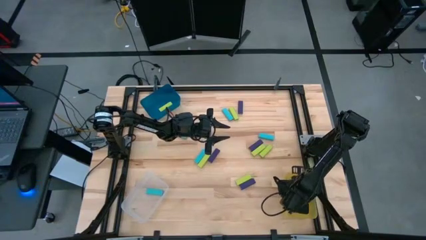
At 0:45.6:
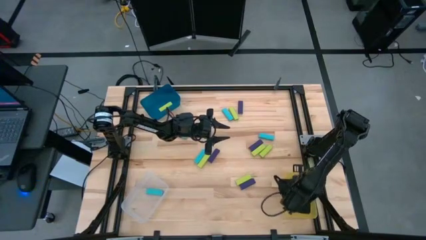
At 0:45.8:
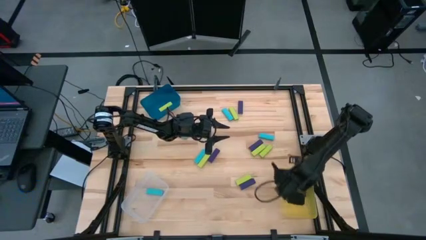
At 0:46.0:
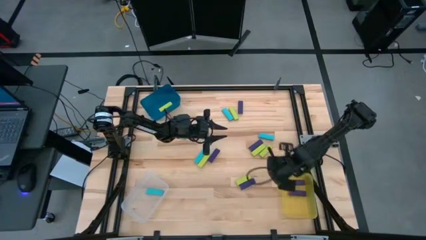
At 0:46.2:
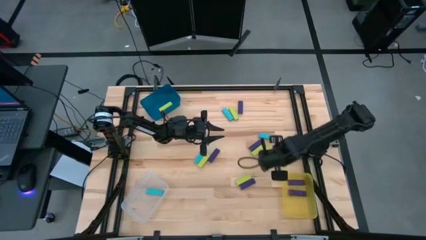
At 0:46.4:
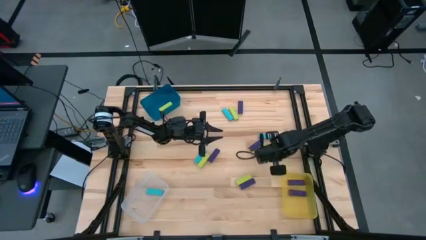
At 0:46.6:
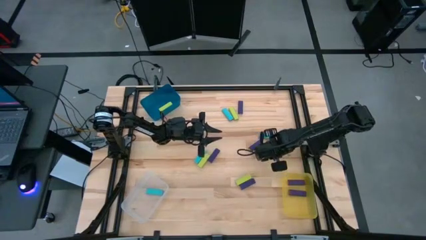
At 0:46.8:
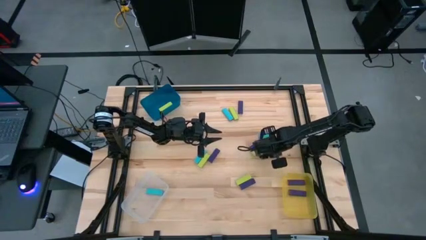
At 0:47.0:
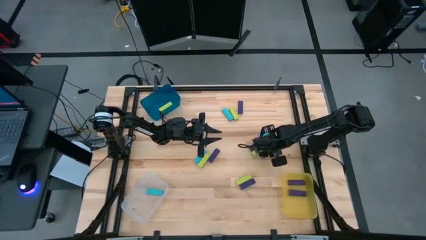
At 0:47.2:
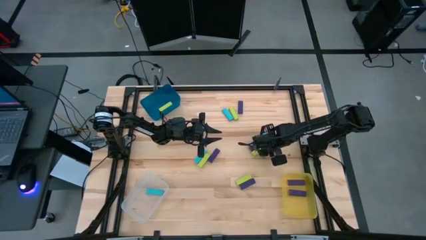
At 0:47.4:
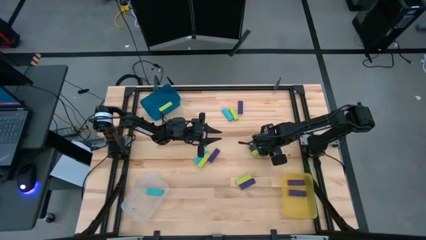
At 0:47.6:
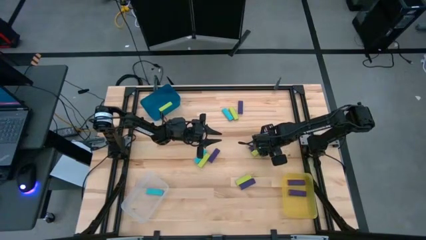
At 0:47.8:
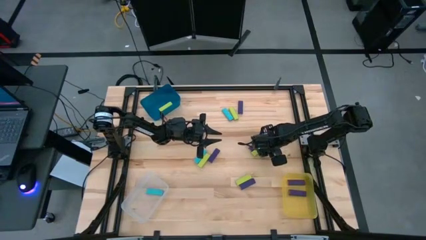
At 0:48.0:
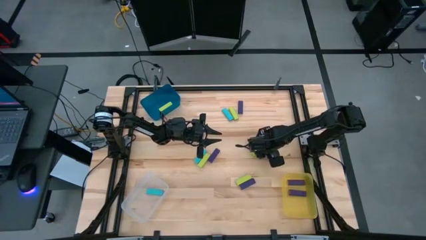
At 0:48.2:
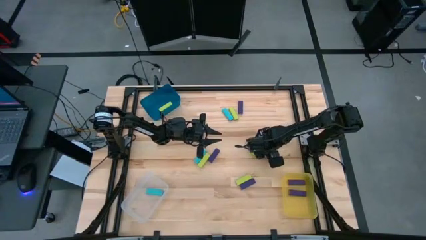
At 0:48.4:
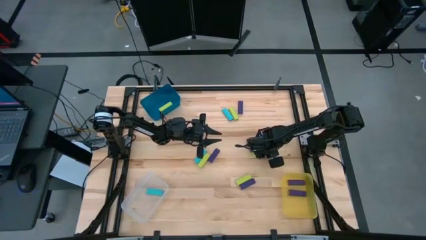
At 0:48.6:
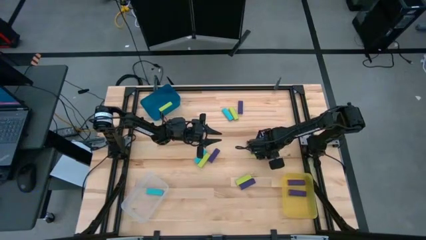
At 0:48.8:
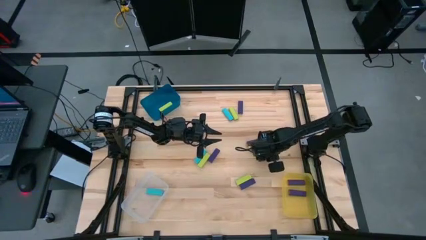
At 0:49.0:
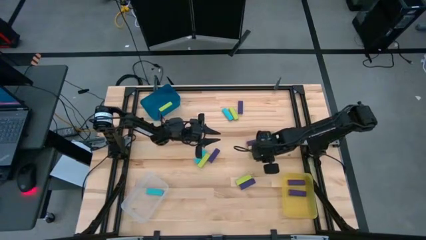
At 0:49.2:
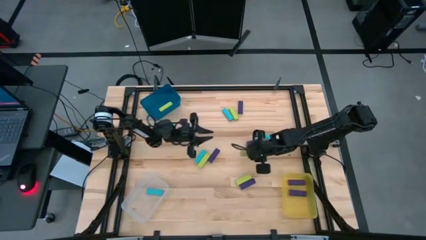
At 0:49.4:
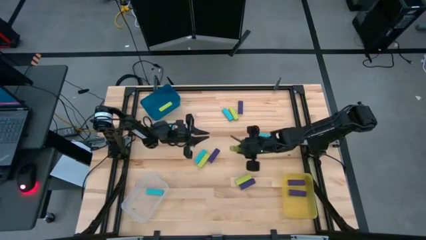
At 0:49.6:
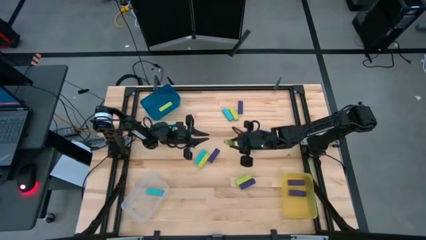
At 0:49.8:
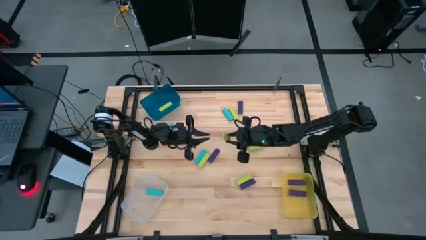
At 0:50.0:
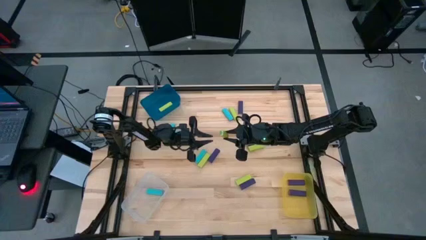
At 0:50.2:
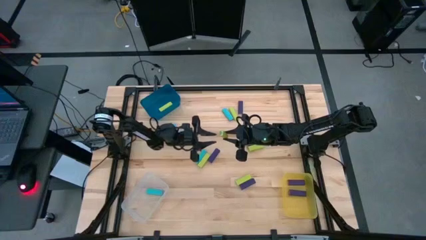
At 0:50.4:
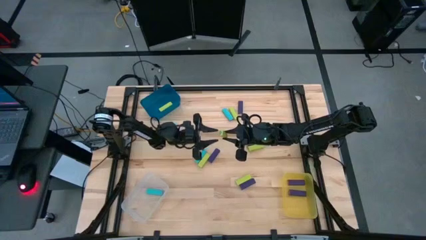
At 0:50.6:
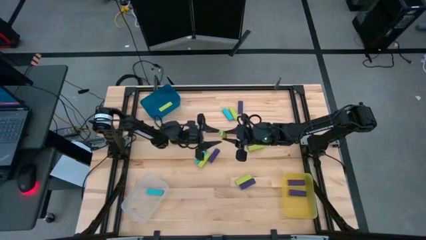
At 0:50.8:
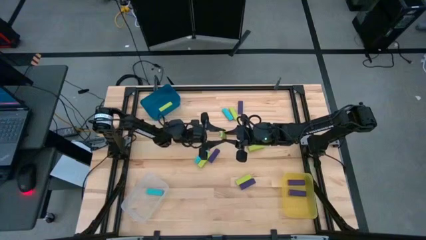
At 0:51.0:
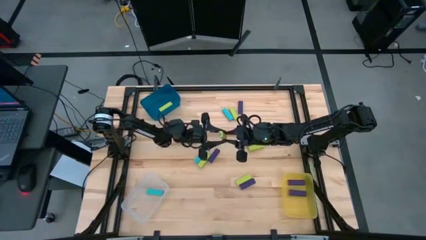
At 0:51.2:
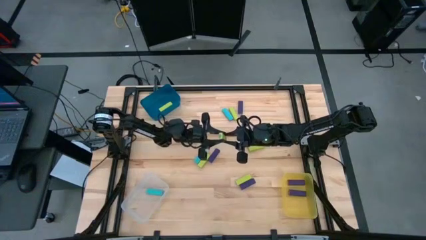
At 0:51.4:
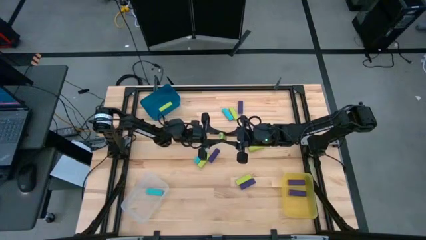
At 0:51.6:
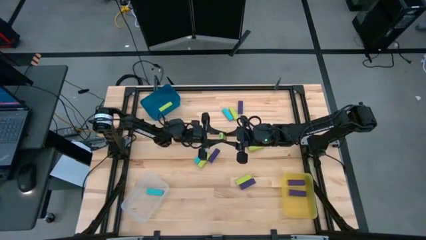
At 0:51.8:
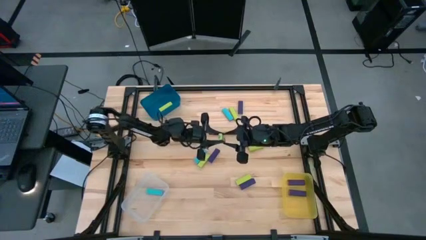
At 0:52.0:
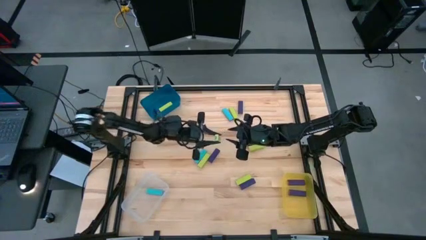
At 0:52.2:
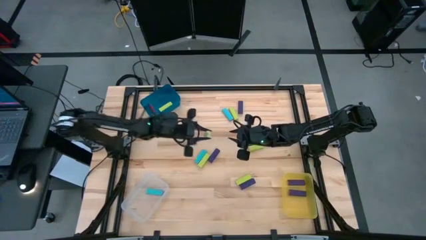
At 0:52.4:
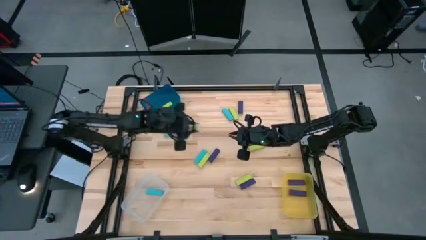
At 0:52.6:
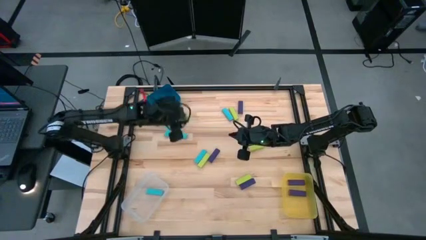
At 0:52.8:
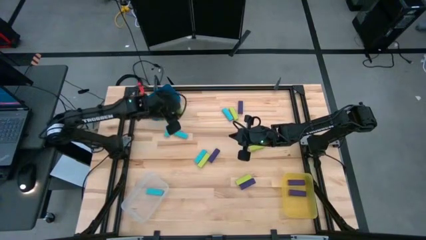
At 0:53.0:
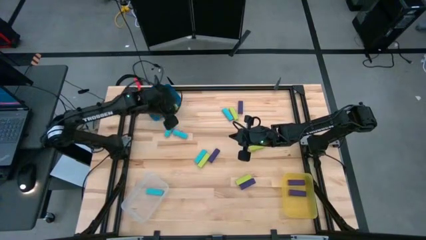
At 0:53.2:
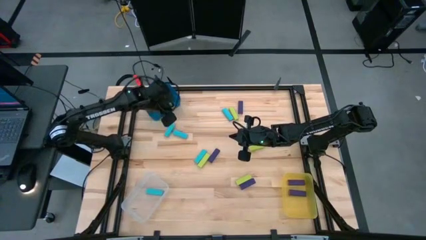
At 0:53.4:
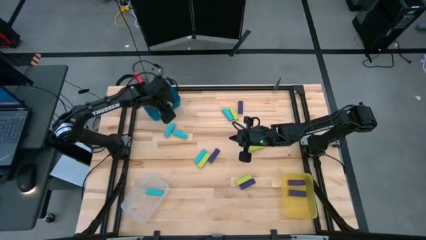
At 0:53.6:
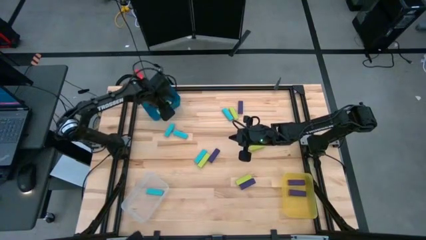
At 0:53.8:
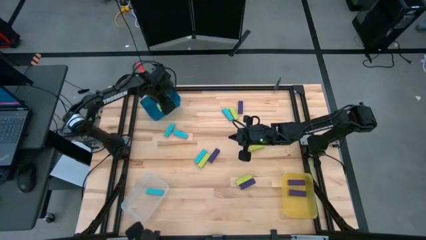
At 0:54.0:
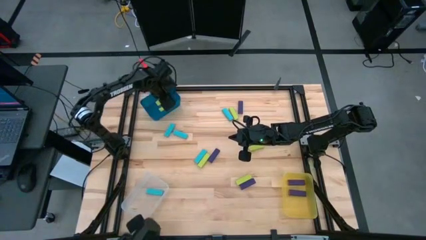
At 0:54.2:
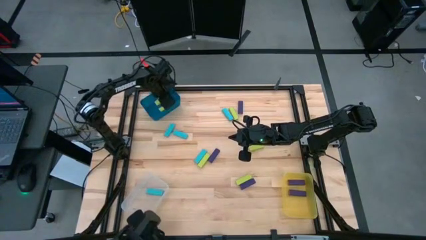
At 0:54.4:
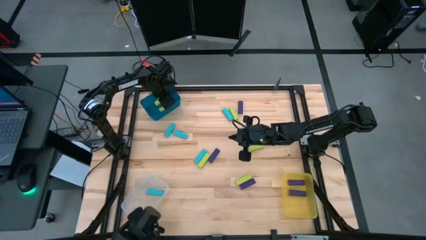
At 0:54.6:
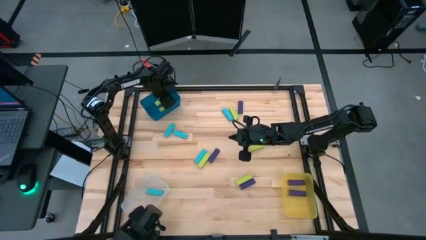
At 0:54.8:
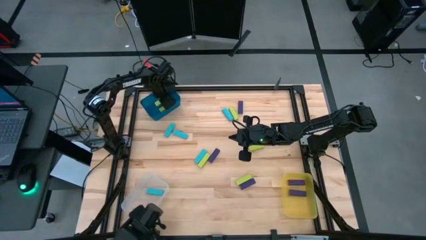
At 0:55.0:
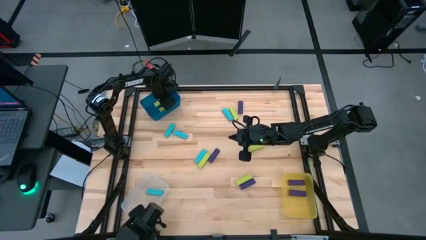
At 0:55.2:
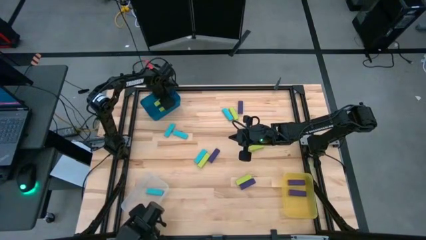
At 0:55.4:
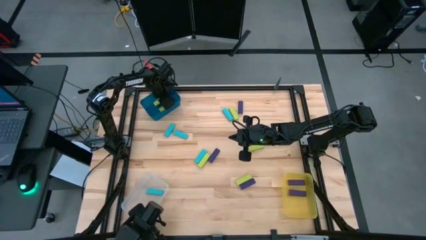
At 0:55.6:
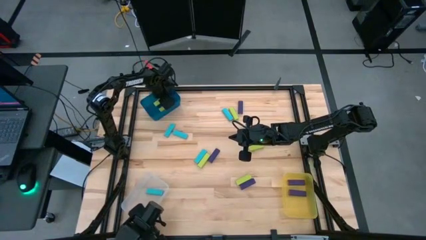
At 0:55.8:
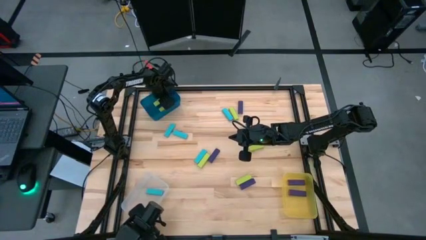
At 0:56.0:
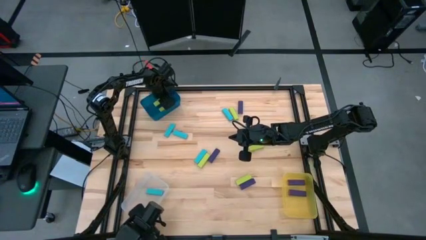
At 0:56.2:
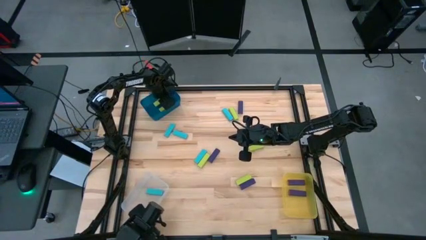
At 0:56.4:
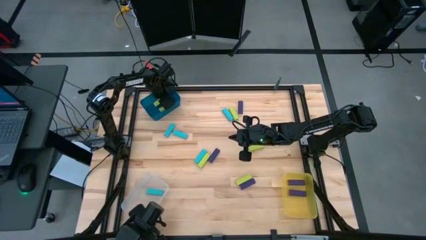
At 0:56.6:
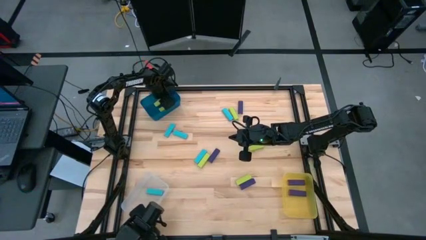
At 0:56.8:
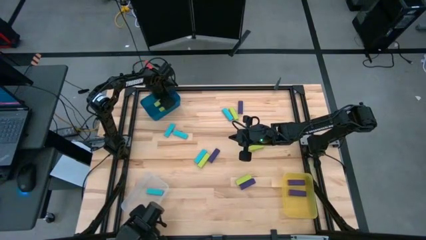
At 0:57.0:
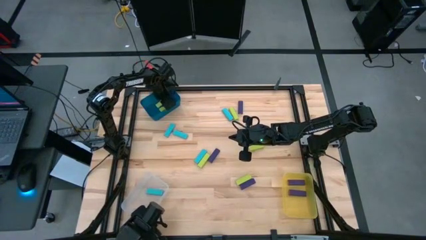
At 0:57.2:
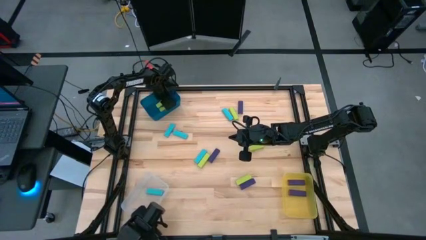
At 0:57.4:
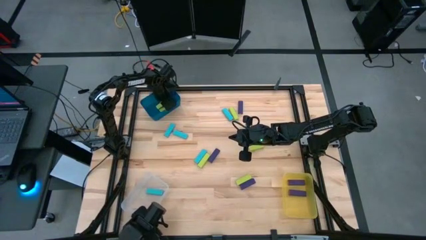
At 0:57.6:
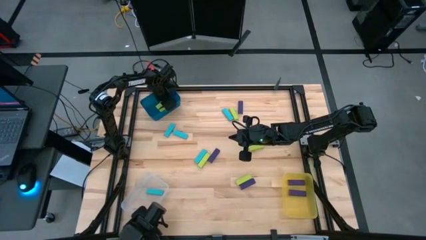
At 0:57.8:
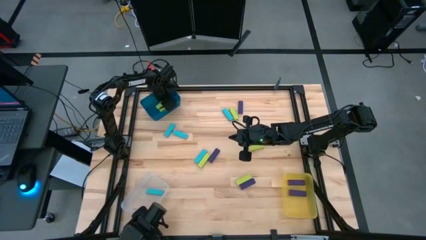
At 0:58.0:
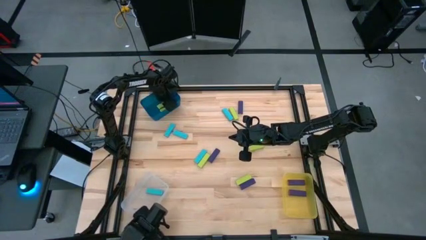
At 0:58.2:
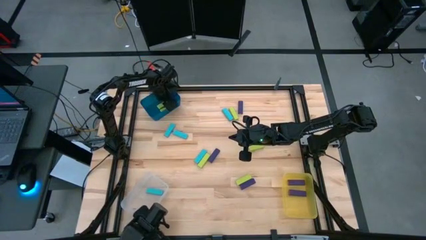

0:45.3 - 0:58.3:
Task: Sort blocks
Put the green block into the blue bin

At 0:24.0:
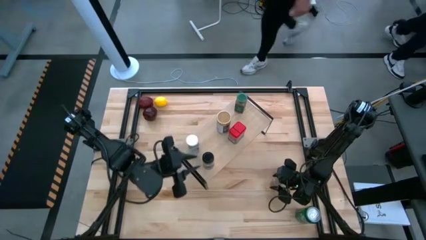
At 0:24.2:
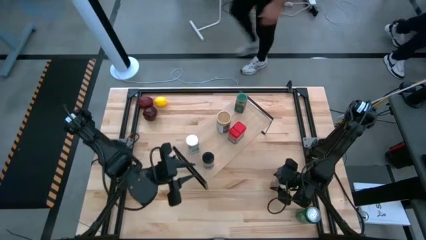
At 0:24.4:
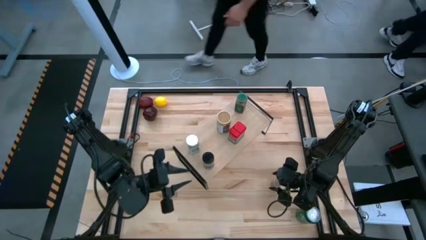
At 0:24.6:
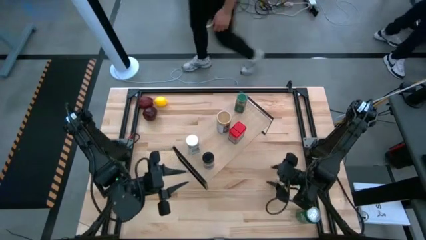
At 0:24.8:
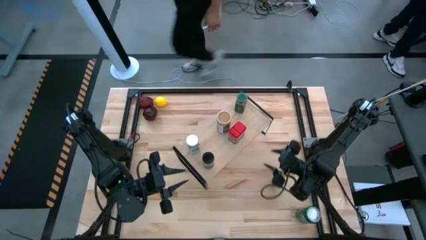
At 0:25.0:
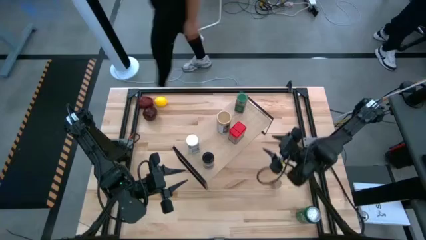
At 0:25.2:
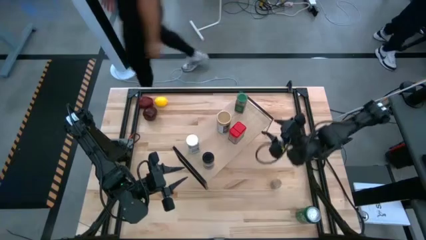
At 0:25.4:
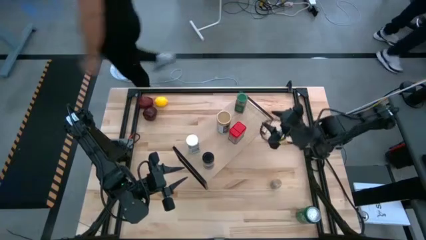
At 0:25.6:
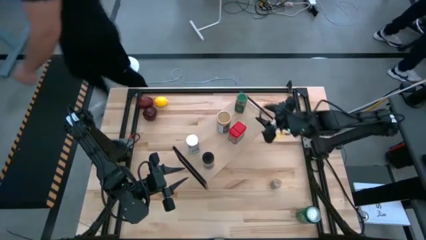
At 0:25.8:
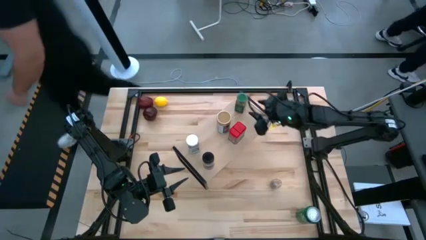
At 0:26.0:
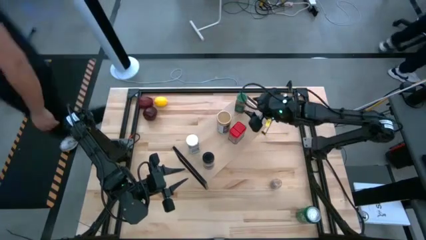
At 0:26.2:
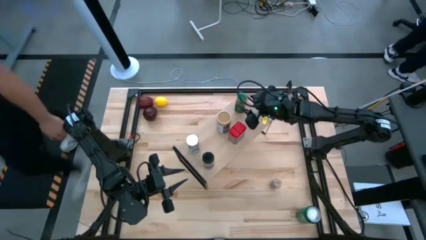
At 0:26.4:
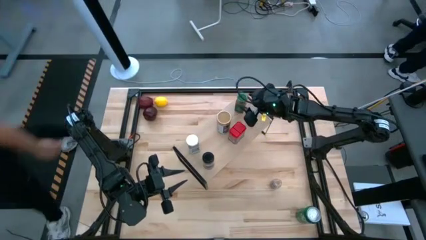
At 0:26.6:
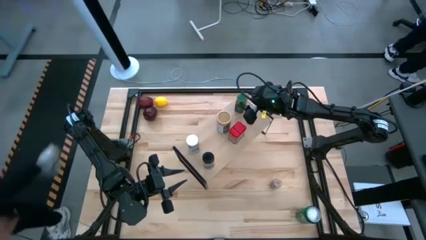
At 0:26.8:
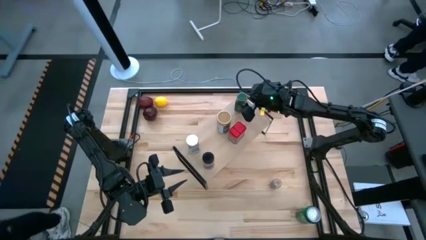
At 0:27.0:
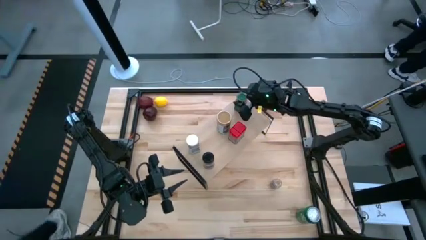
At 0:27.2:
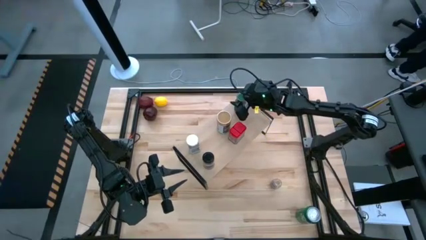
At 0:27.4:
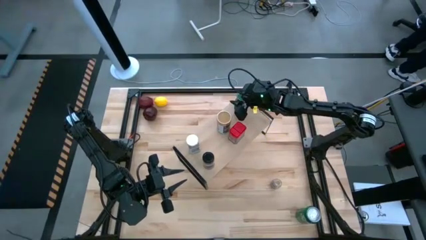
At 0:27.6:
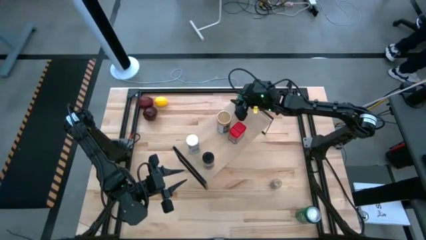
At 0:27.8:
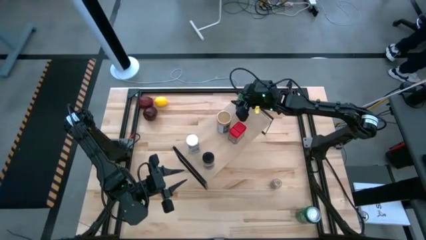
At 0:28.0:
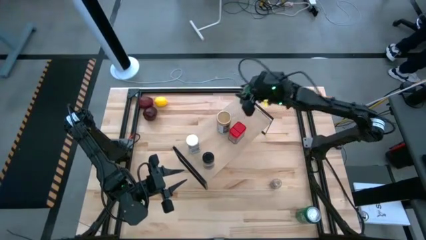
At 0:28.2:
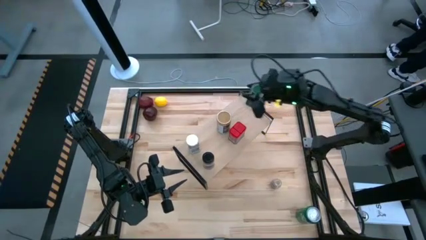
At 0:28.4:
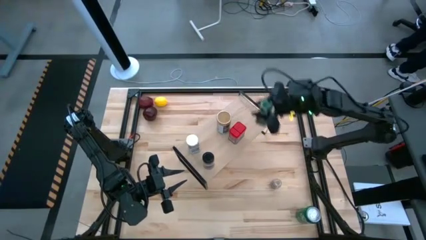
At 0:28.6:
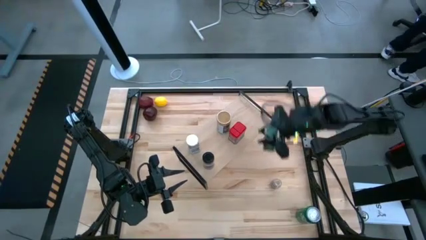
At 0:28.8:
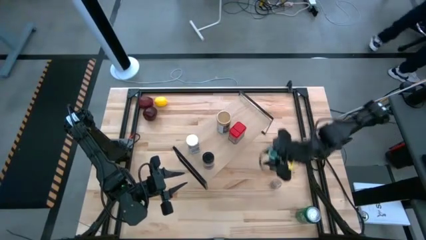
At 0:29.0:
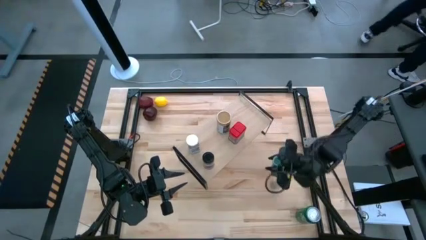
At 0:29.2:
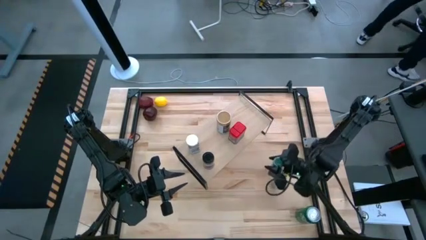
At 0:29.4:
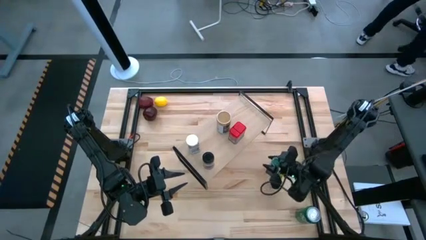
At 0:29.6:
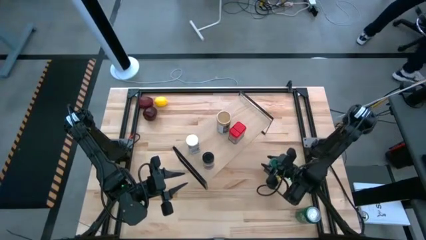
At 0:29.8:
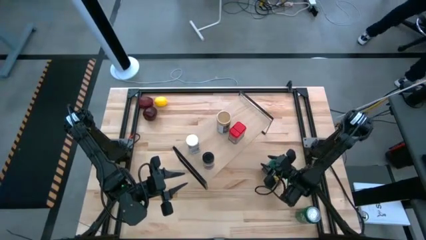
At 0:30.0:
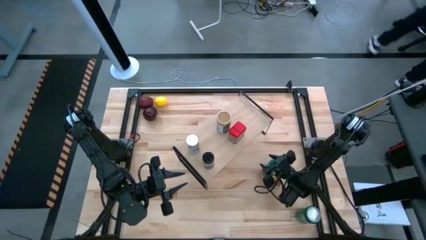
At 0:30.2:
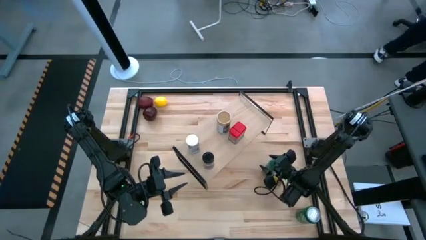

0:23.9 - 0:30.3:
Task: Shelf spices
Remove the green seasoning bottle from the shelf
